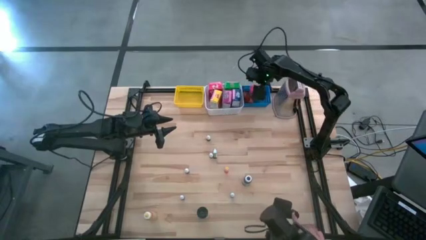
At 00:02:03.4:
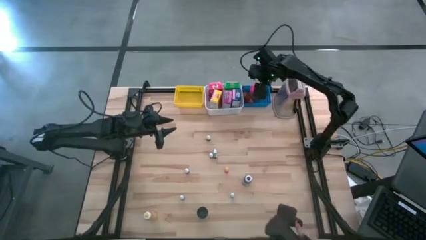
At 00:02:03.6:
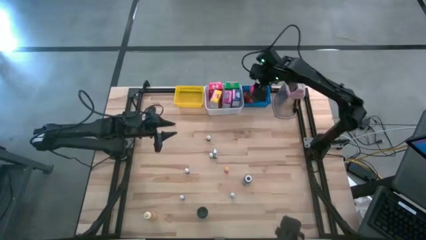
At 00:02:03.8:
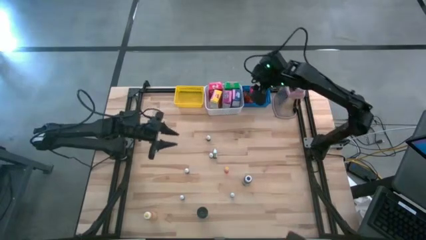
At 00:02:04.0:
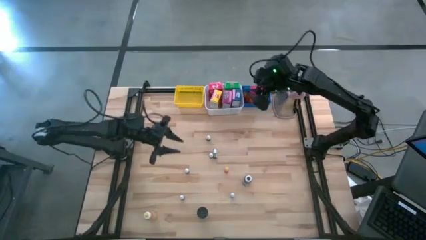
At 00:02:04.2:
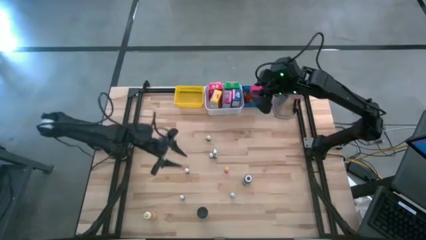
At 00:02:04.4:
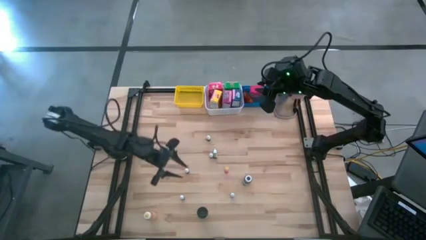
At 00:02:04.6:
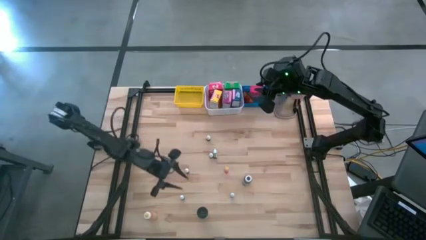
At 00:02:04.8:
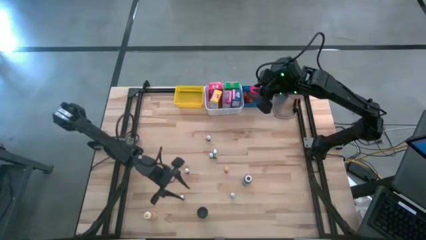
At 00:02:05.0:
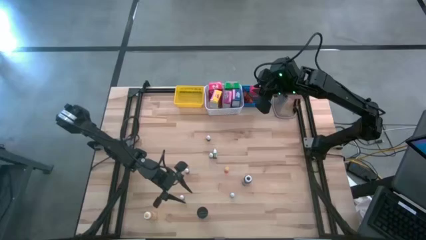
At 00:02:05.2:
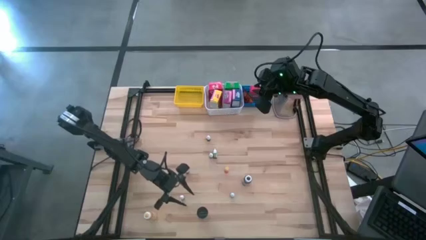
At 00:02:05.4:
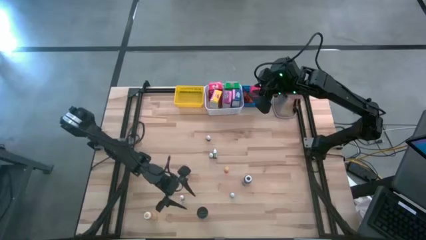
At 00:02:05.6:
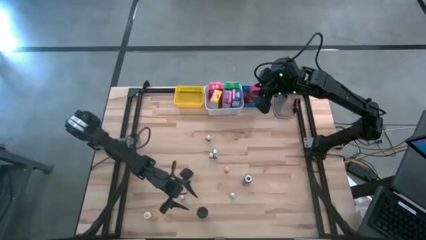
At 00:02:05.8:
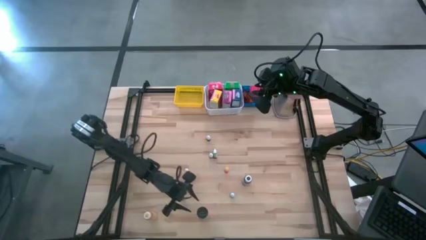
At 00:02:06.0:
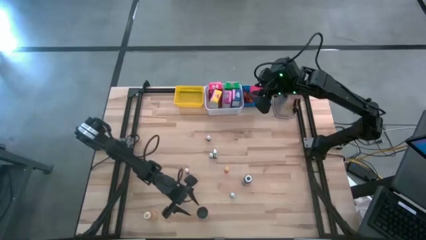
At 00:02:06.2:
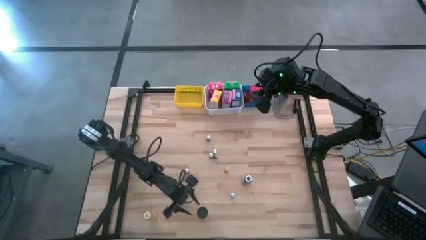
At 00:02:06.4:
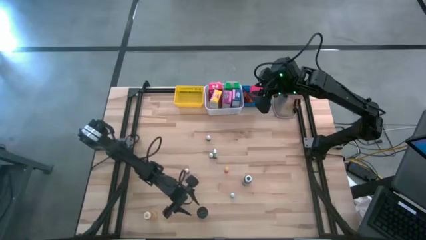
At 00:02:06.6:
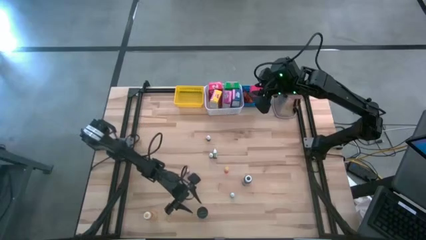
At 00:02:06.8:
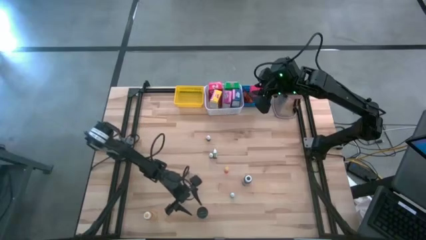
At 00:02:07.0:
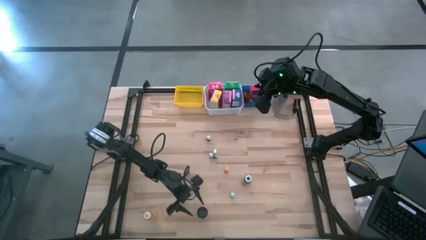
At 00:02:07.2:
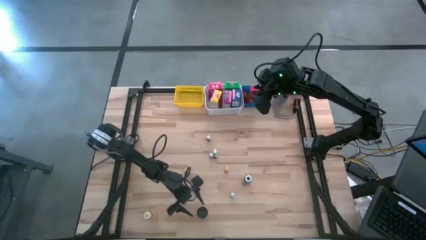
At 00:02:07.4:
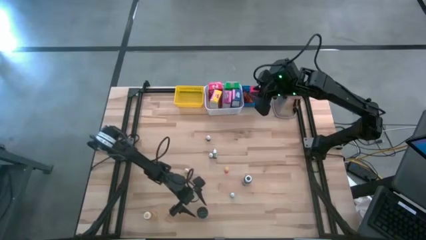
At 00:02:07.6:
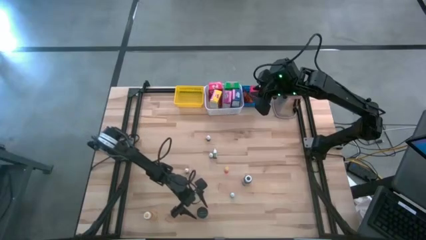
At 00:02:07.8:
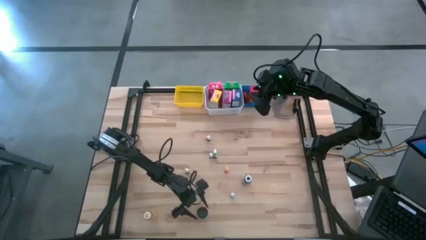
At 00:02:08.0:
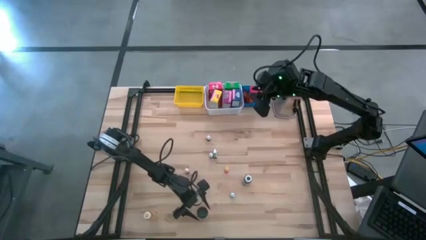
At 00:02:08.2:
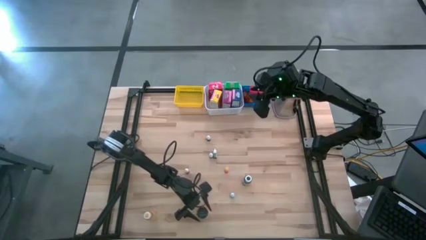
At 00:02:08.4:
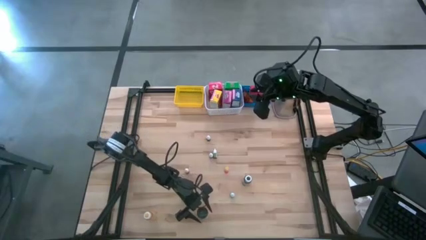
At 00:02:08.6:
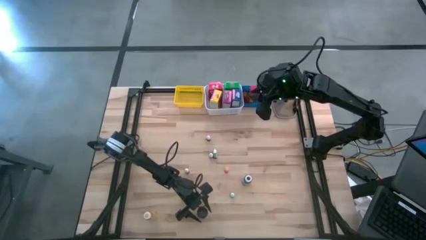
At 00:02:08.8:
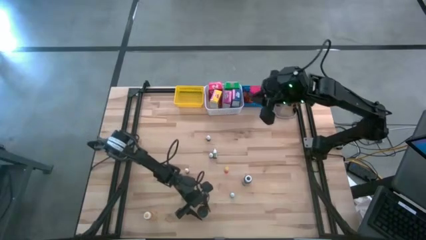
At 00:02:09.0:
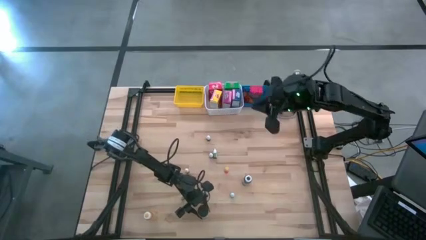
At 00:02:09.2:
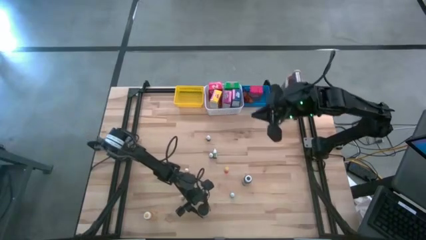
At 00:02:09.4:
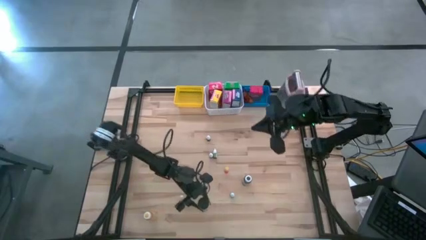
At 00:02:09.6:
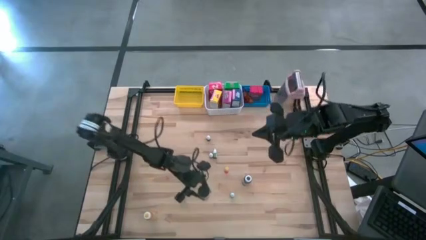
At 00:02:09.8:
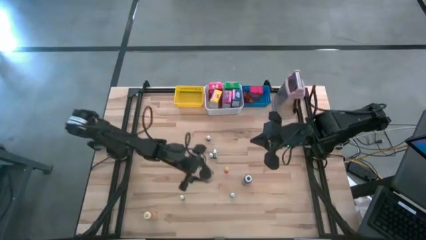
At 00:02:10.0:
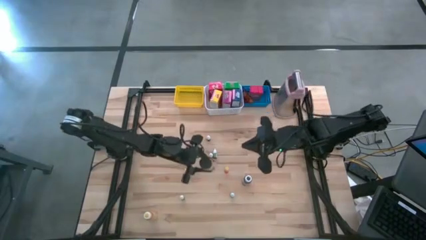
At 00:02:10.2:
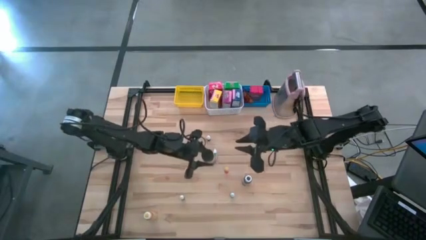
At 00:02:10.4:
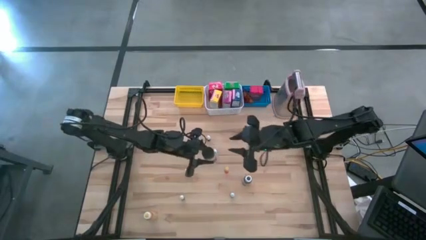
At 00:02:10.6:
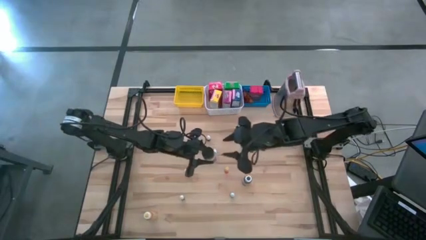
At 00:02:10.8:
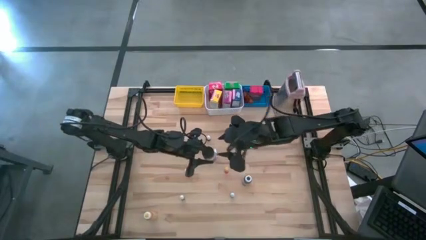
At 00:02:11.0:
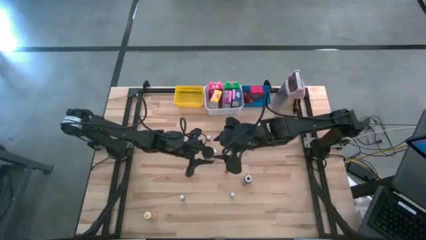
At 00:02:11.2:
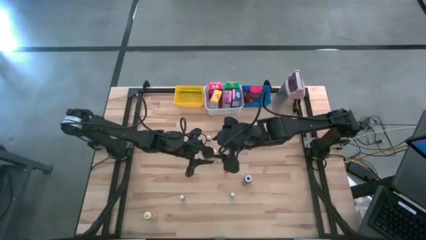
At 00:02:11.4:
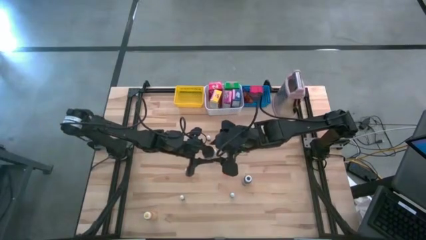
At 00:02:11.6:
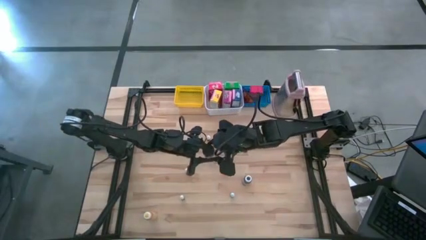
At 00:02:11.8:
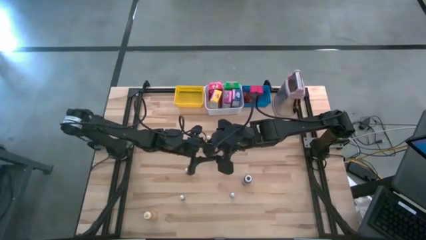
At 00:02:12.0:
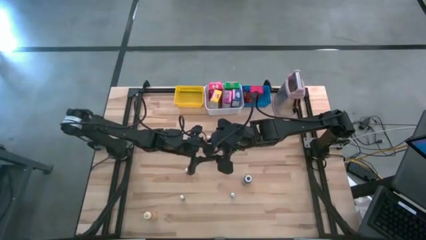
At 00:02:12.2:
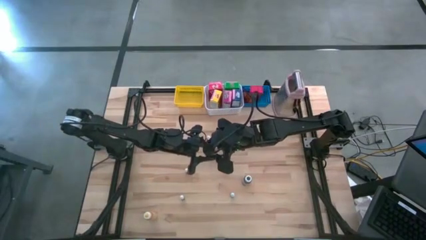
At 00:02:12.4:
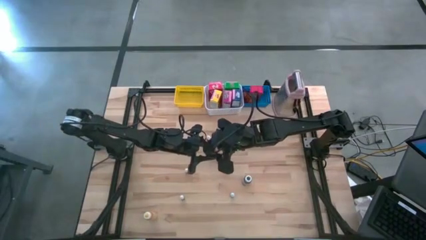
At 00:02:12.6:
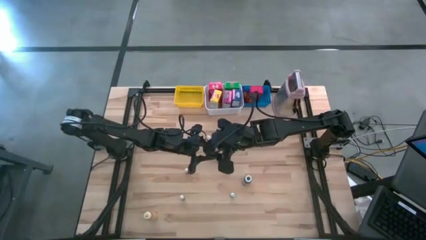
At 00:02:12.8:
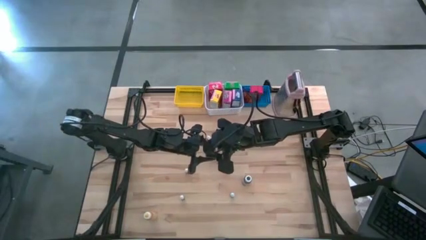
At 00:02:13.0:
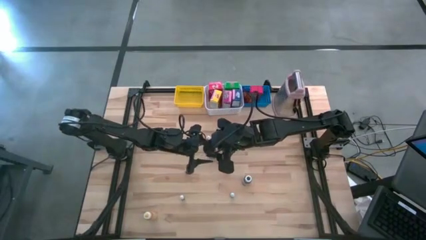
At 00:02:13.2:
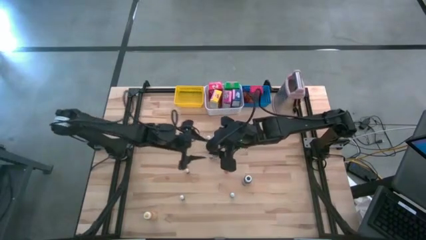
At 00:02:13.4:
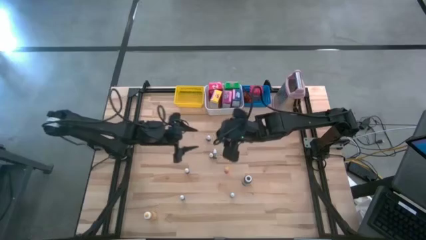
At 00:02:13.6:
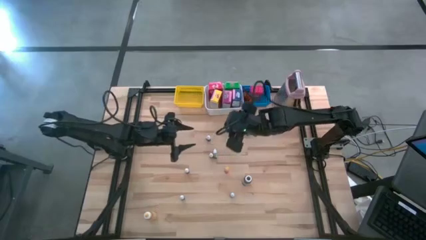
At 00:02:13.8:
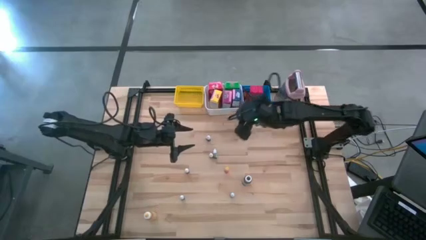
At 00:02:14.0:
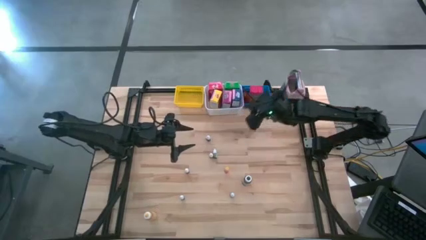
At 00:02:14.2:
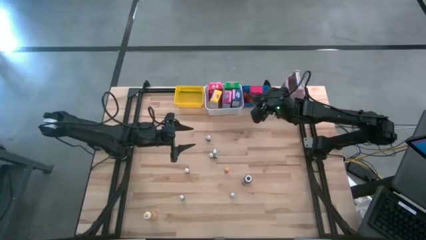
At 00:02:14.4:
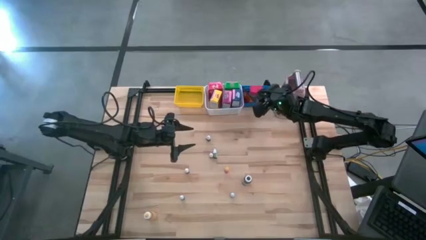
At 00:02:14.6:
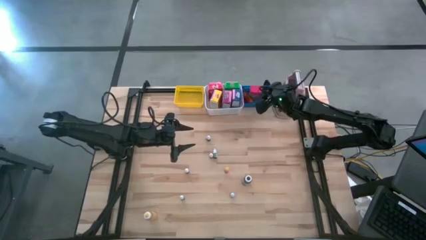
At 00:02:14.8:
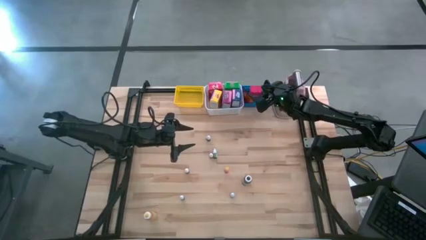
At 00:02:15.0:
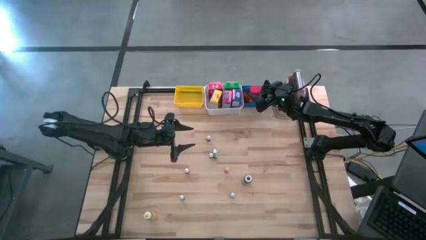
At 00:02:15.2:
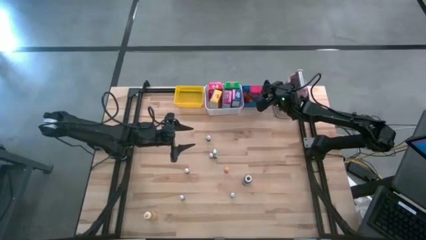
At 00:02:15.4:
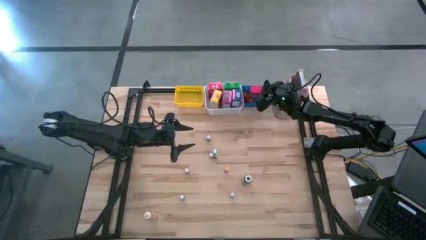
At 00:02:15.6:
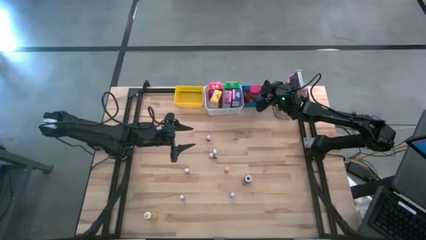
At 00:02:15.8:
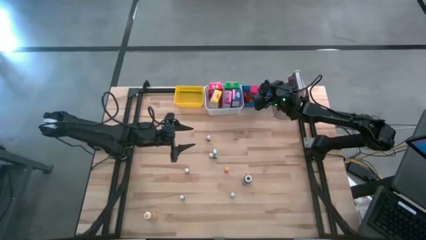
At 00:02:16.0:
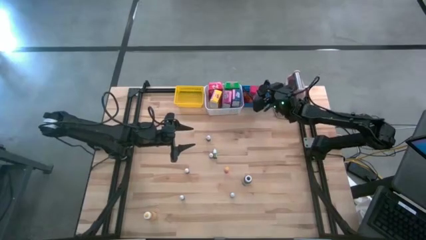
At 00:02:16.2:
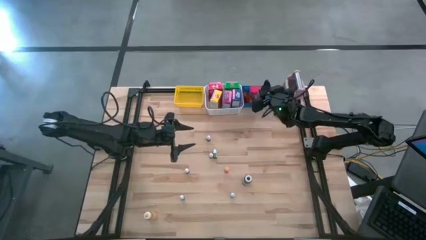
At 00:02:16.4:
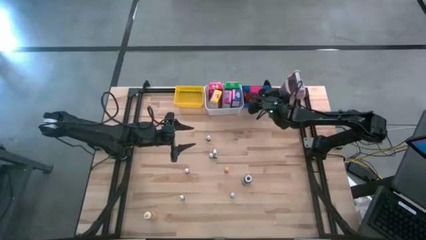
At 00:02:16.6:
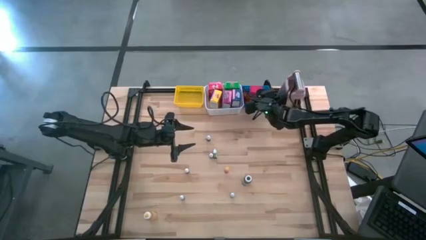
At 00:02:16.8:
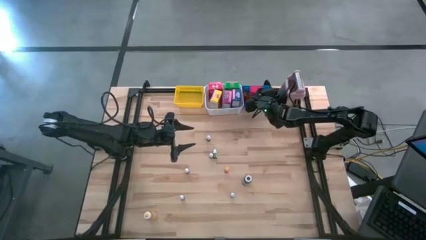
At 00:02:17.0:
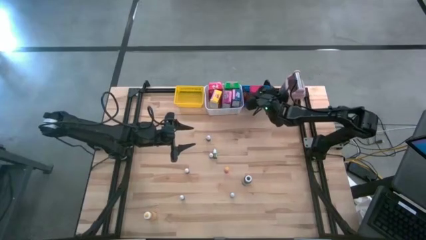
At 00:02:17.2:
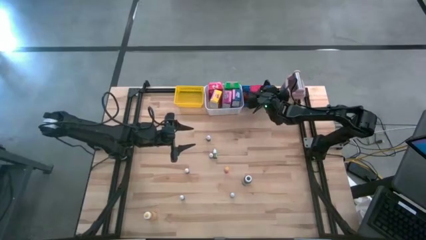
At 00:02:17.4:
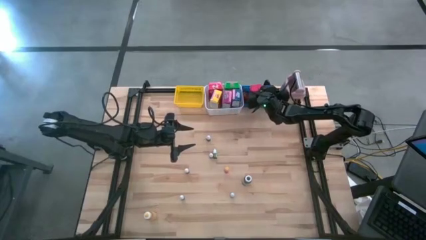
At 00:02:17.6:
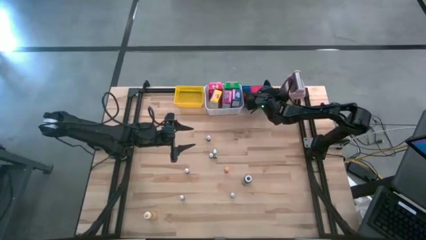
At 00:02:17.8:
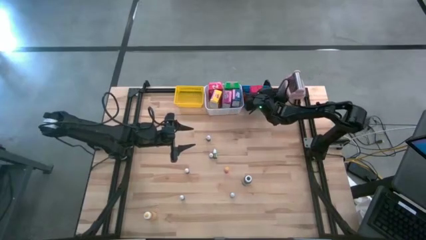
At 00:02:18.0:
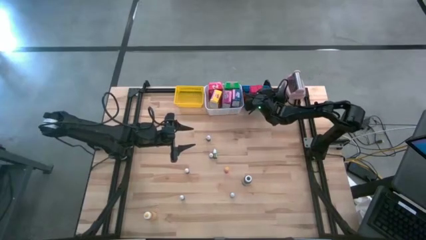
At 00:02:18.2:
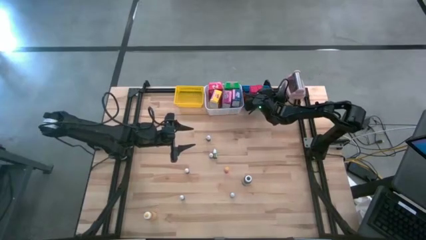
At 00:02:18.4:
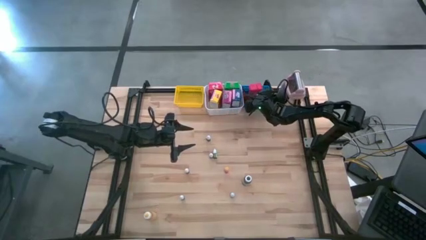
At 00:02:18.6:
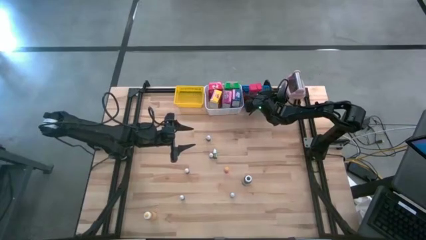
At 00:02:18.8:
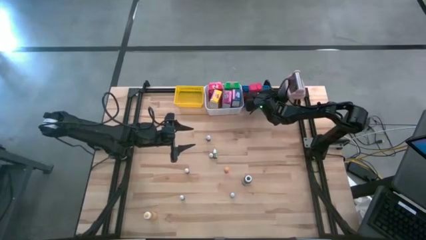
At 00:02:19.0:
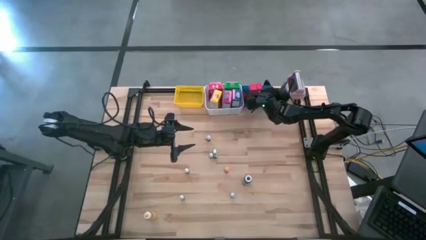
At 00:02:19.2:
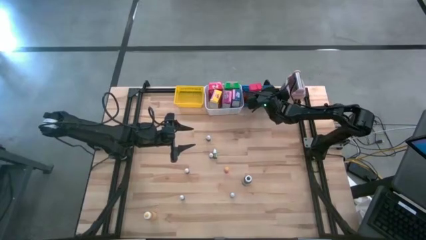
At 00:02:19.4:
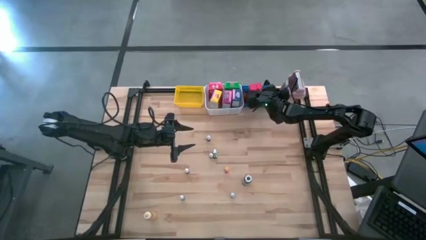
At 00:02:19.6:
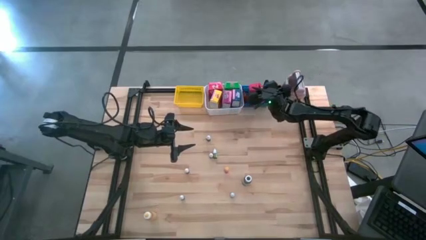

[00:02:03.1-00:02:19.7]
Task: Pick & Place Kitchen Items
Put the black seasoning bottle into the blue basket
